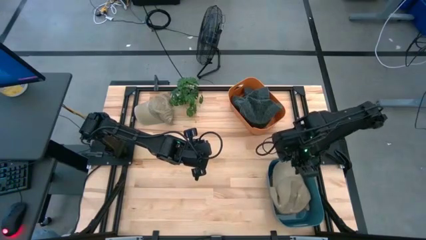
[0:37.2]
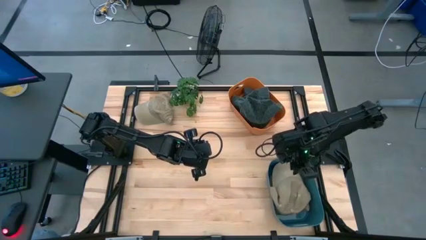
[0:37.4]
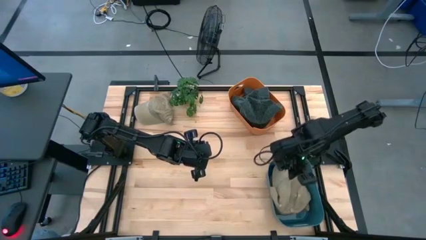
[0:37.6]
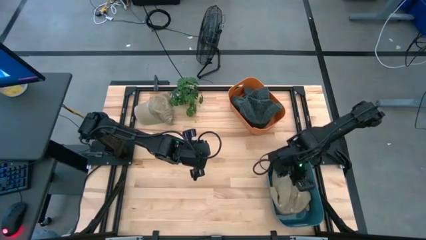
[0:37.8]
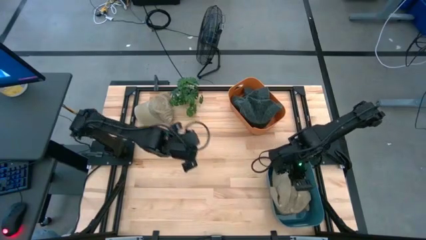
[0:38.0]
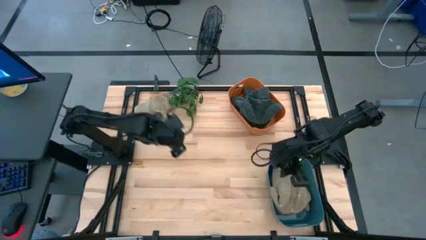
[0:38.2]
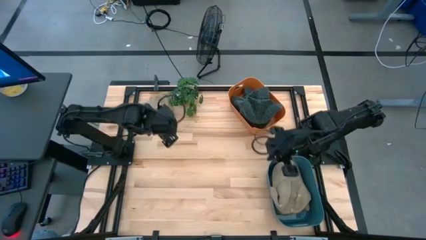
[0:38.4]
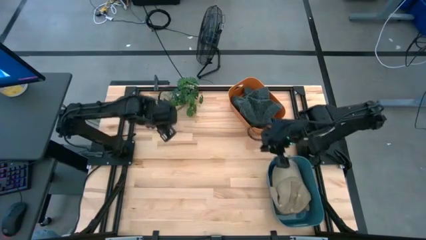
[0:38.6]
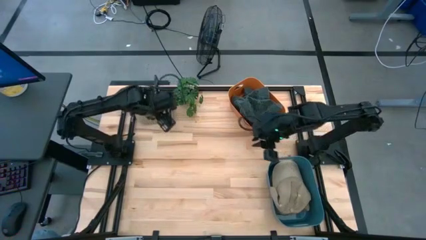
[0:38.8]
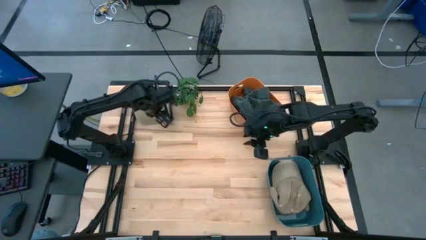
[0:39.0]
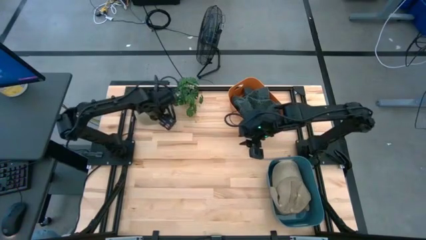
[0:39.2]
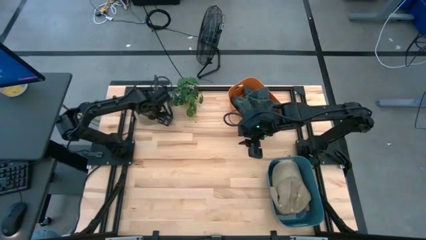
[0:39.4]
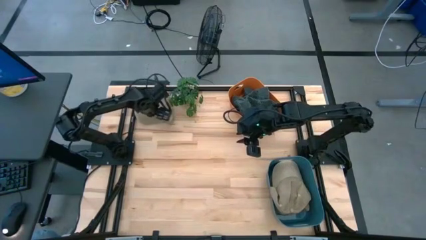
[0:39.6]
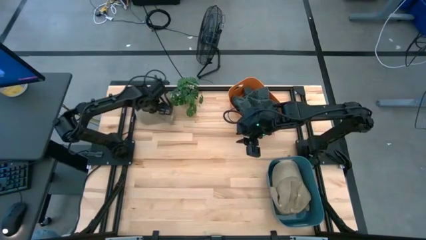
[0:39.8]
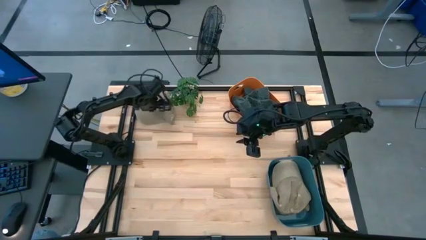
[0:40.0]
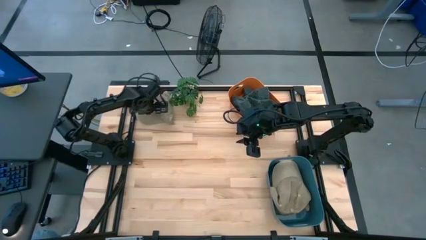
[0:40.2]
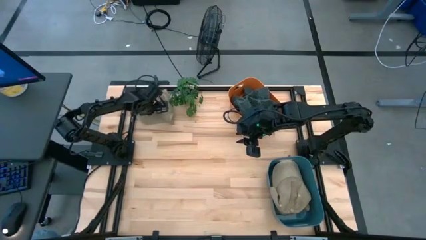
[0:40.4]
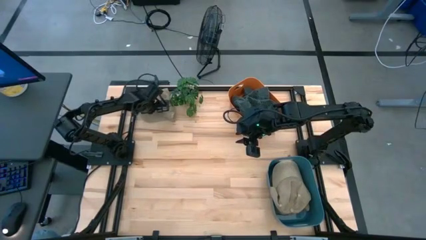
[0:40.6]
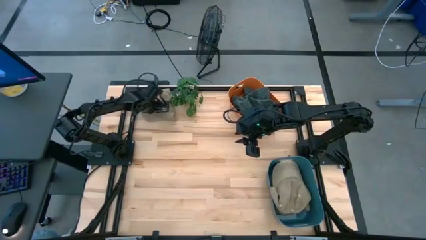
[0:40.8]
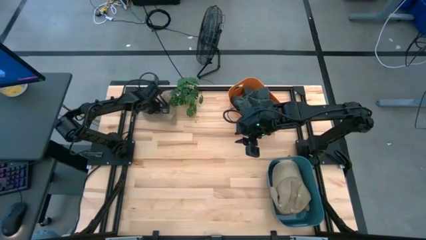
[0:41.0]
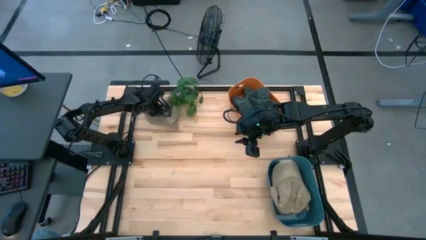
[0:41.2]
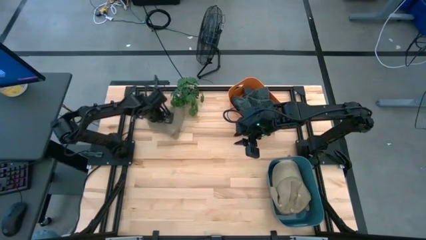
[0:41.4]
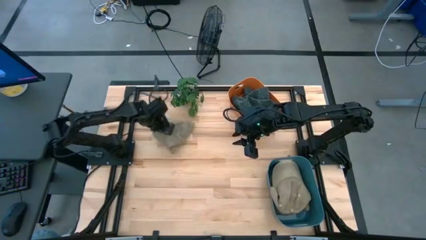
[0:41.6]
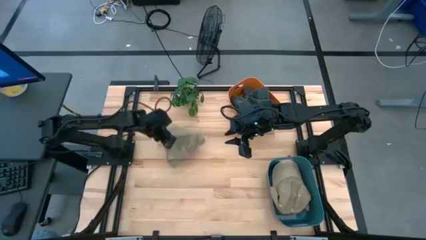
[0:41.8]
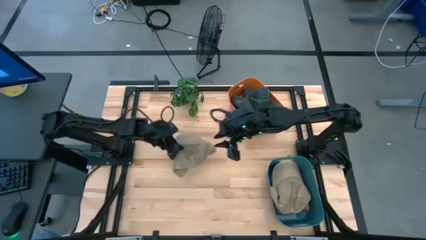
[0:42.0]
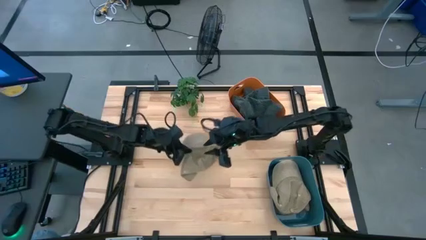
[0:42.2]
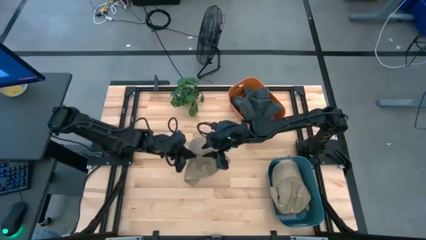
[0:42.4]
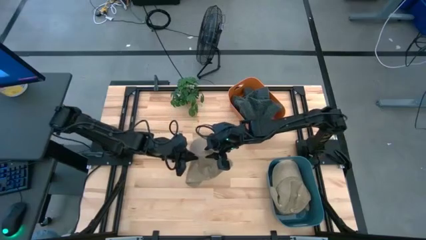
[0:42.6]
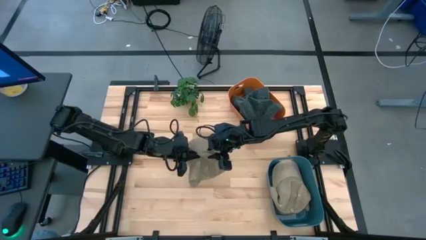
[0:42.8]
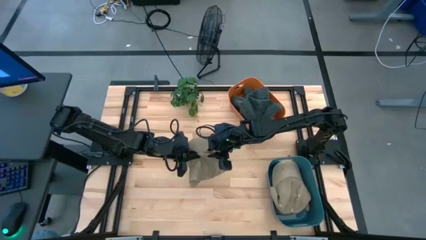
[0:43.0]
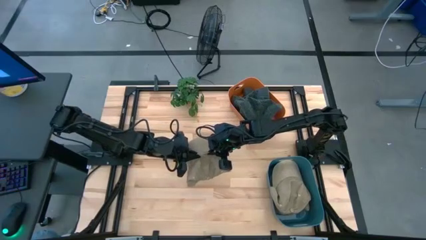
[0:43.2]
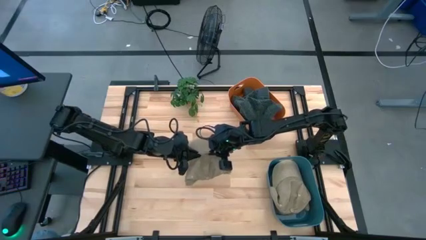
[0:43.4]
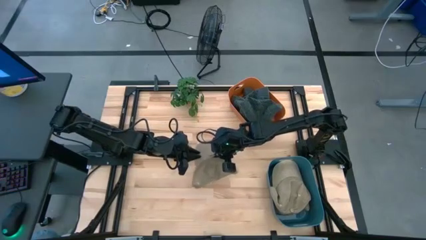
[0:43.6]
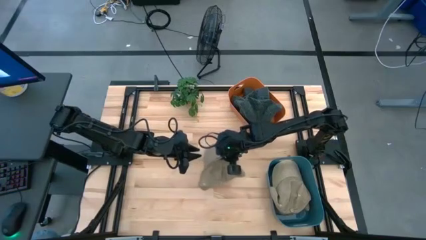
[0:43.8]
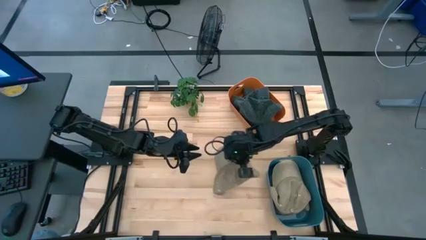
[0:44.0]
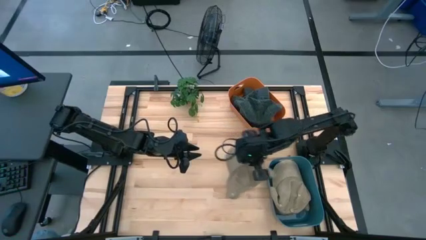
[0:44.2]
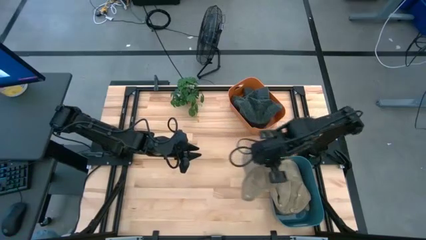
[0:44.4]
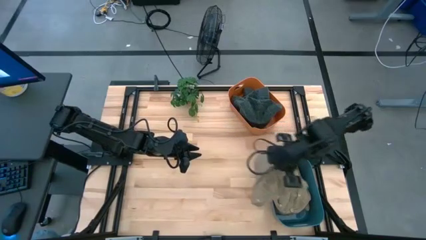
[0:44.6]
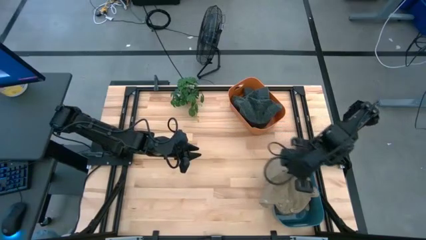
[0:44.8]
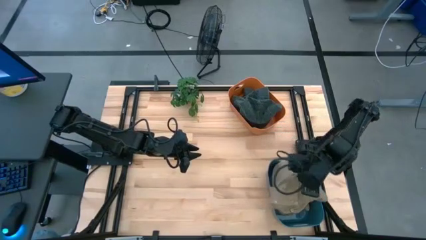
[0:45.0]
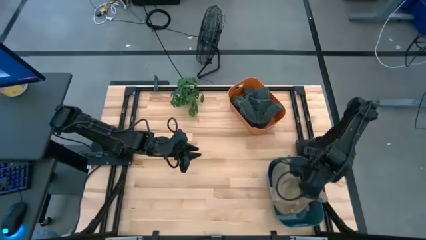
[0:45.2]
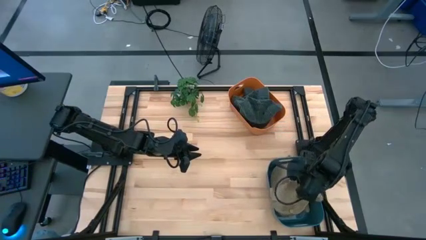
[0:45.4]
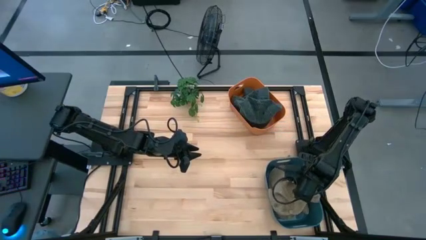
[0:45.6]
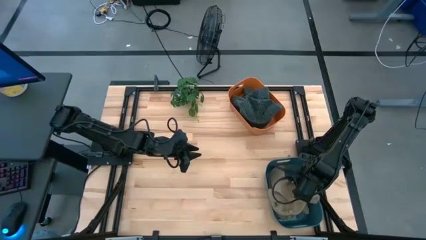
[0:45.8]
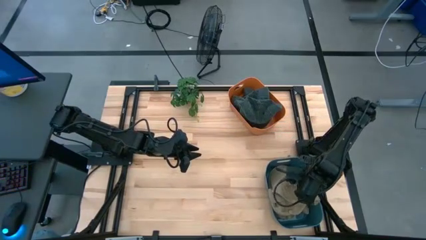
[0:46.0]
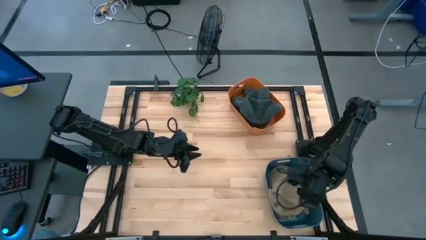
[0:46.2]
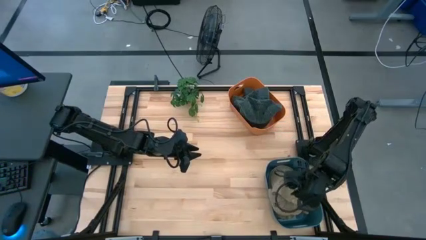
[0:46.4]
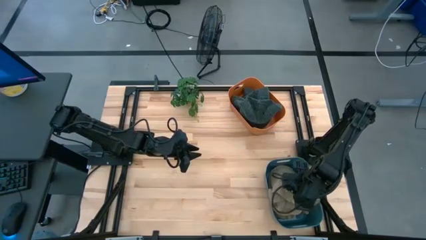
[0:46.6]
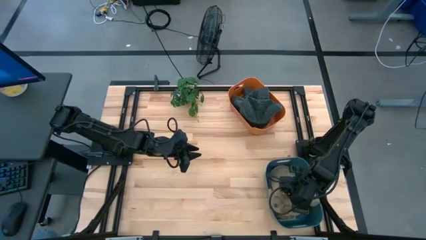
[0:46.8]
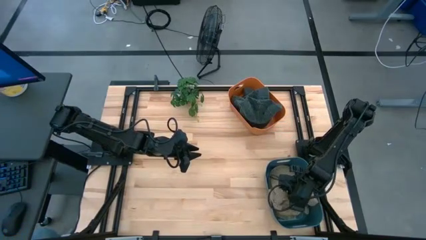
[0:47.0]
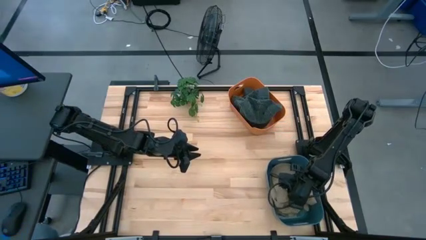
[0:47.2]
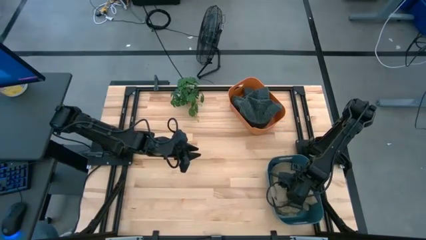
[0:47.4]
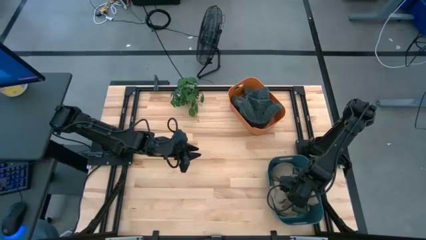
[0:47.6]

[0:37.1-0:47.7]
Task: Pick & Place hat
Put the brown cap into the blue bin

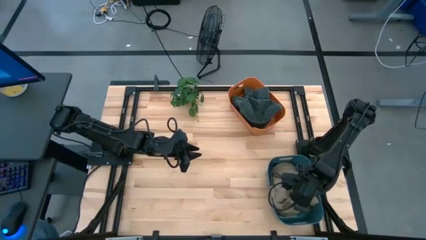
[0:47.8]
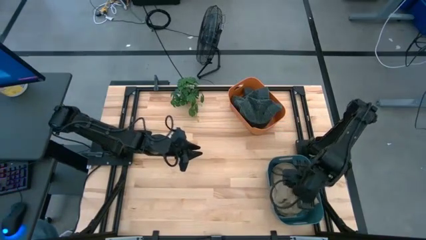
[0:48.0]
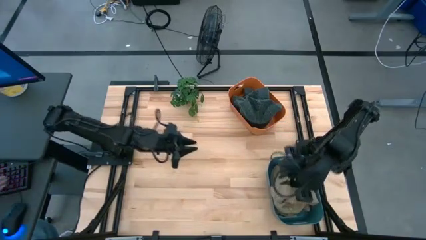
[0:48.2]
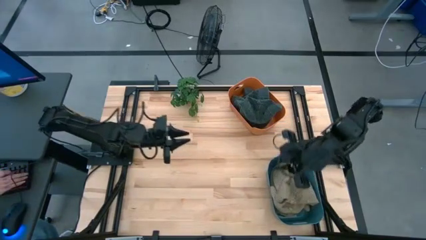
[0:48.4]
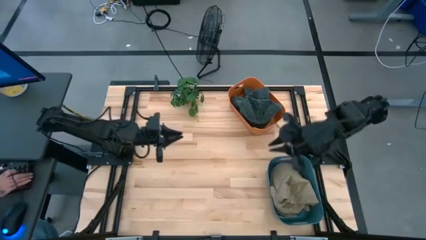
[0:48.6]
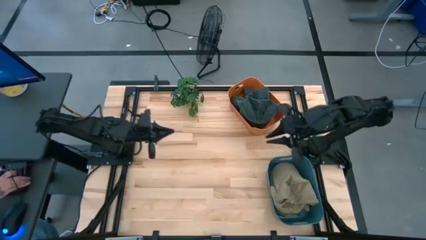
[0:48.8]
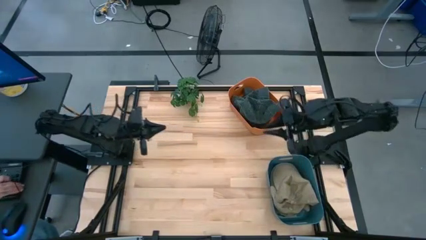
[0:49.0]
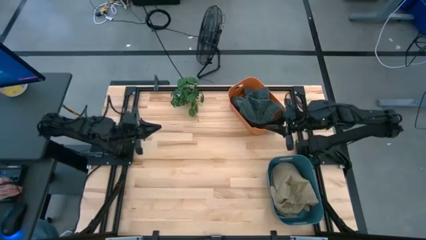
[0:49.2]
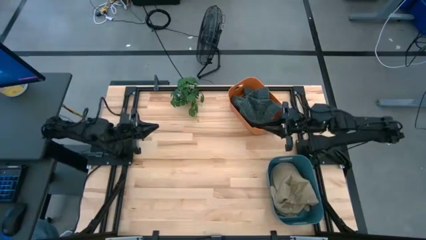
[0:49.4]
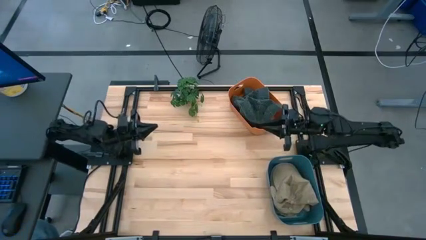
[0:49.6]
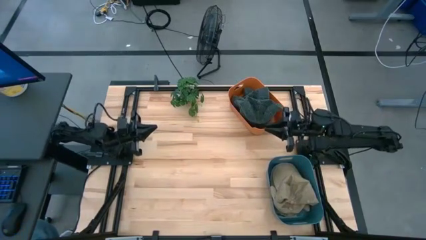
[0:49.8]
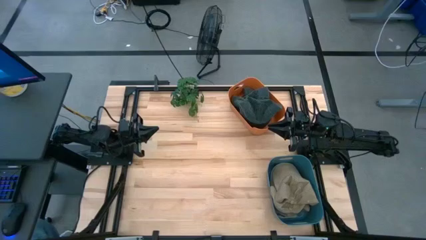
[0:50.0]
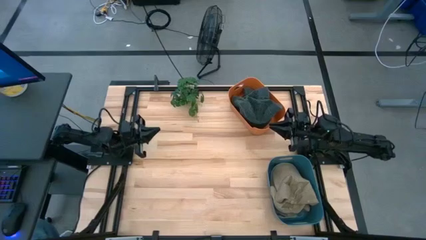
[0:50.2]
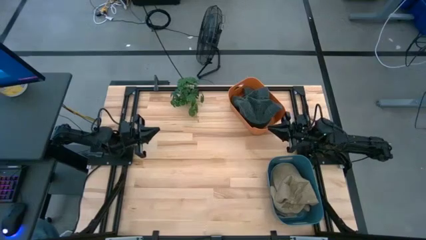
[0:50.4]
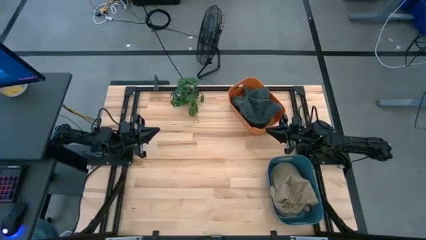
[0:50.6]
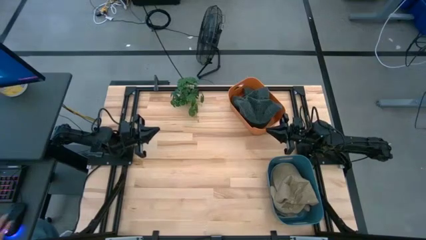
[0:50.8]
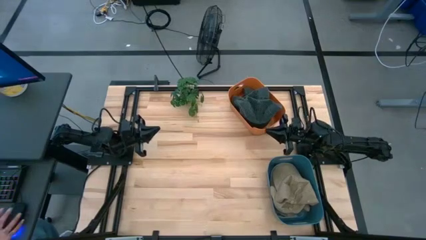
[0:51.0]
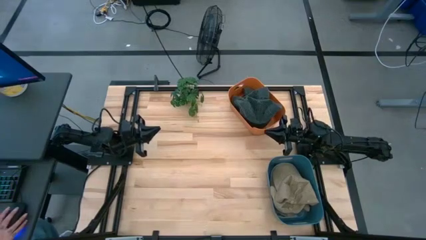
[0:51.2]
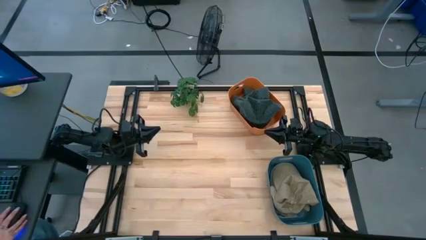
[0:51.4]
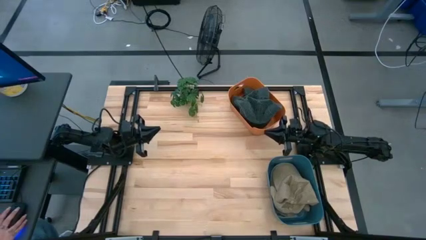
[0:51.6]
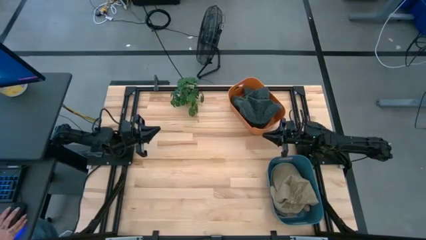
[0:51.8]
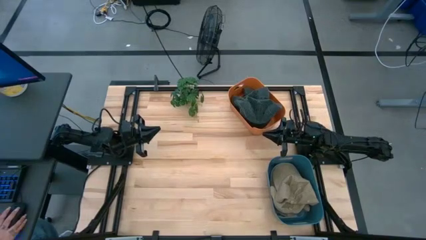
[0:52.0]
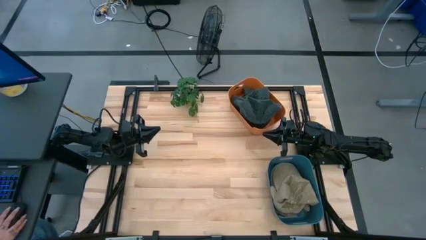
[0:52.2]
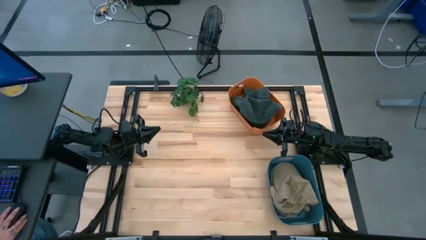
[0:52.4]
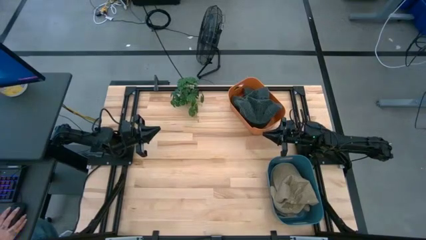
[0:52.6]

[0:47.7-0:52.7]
Return to Home Position

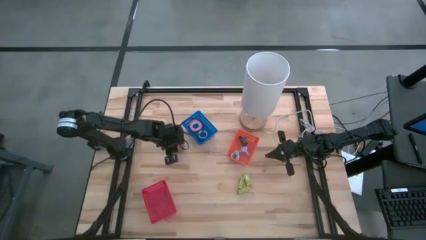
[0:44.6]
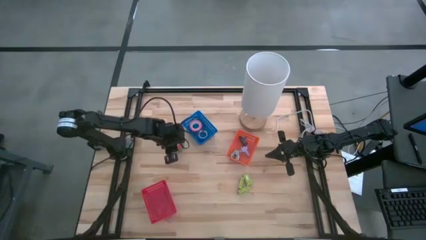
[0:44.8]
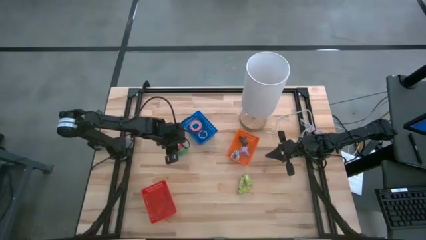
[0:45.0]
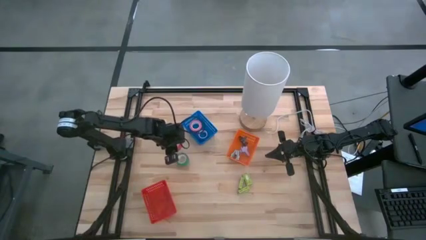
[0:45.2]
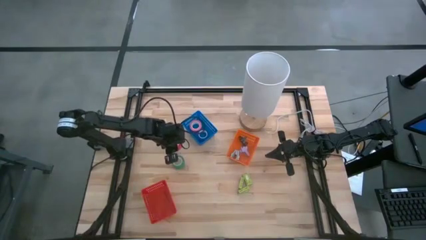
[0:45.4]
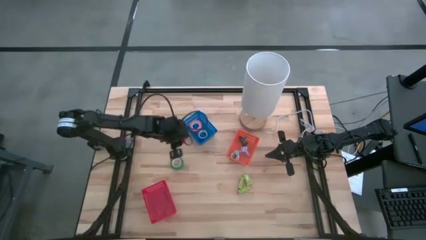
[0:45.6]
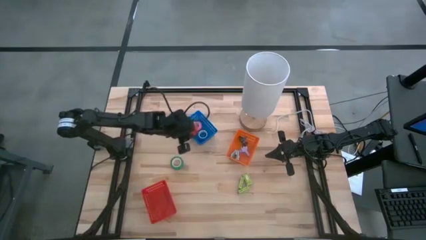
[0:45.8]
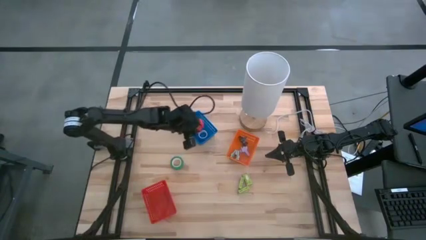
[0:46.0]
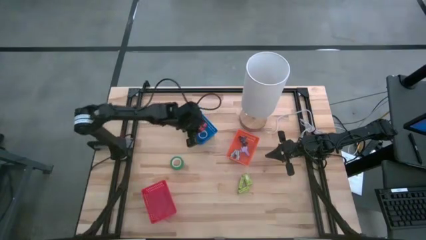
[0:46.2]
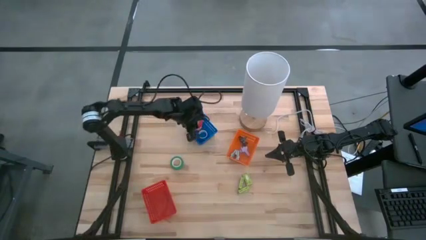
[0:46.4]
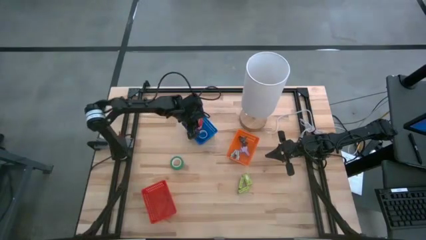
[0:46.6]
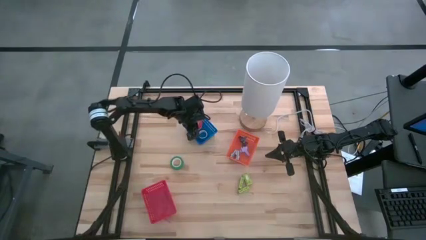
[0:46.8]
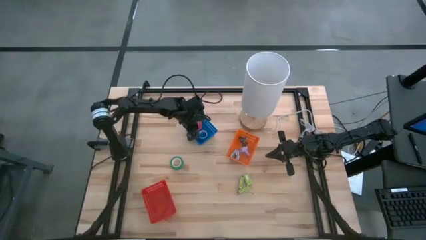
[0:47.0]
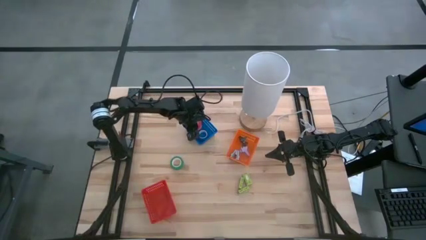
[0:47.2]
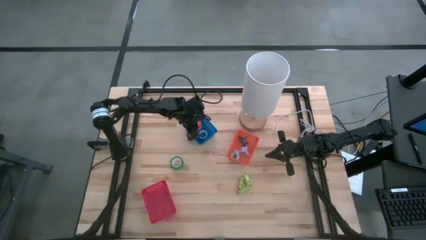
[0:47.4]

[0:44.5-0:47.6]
Task: Pick and place Stapler, Stapler remover, tape
Put the orange tape into the blue basket
